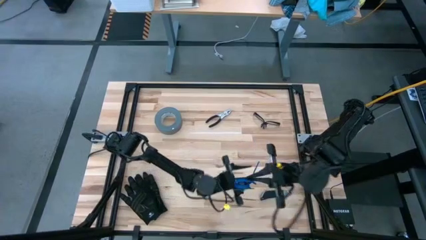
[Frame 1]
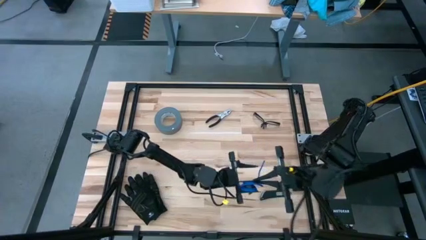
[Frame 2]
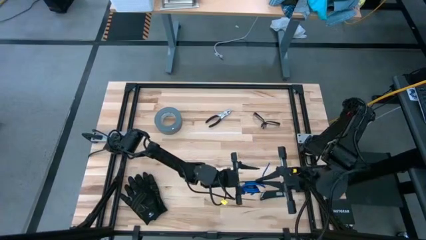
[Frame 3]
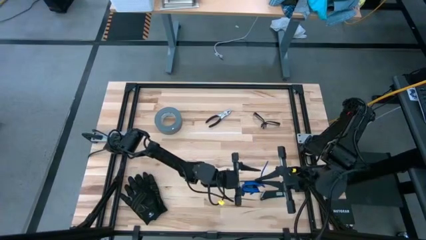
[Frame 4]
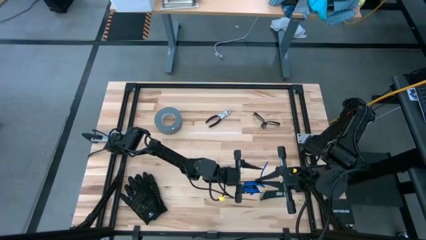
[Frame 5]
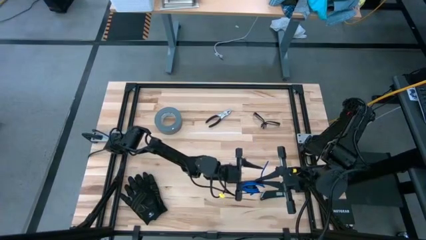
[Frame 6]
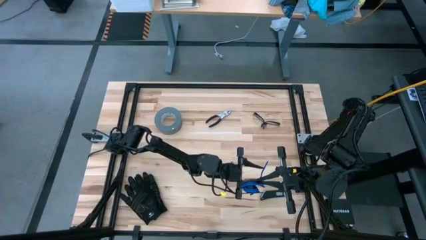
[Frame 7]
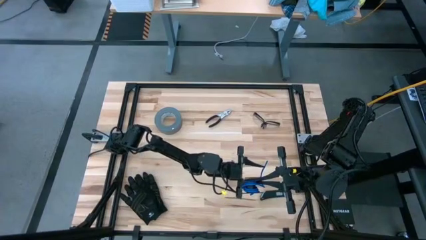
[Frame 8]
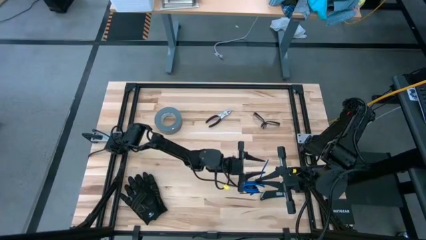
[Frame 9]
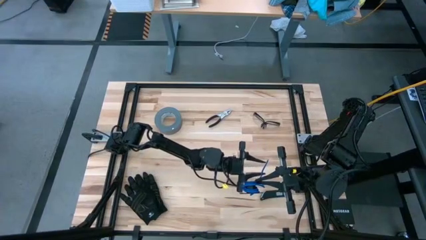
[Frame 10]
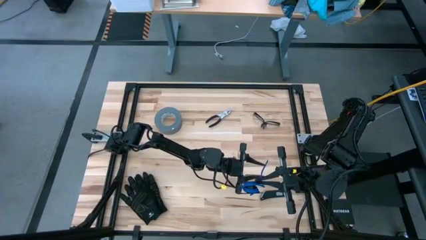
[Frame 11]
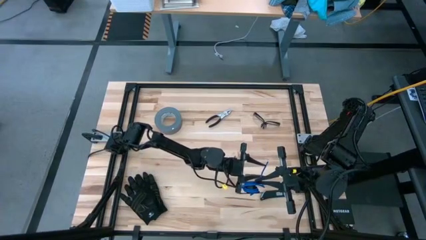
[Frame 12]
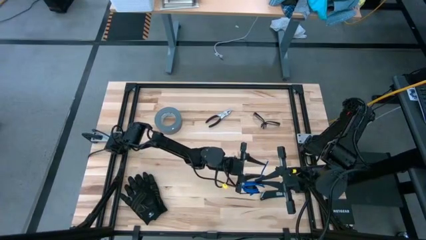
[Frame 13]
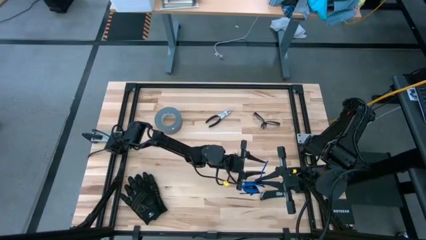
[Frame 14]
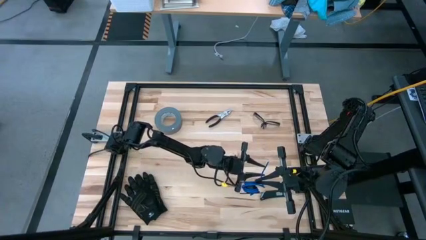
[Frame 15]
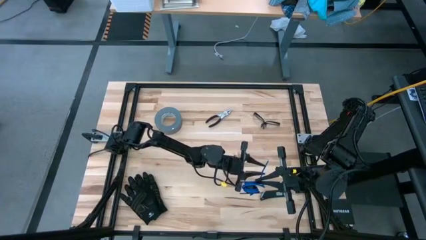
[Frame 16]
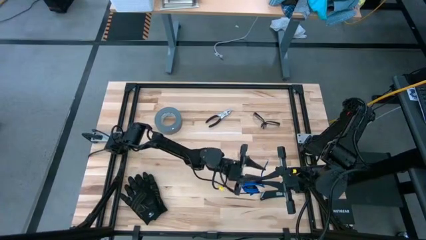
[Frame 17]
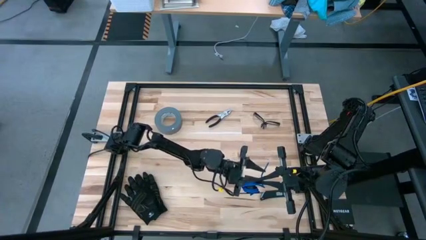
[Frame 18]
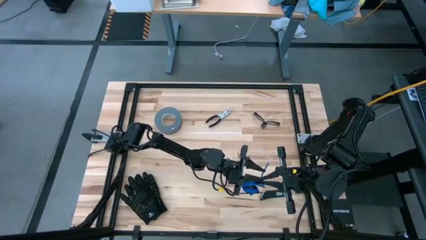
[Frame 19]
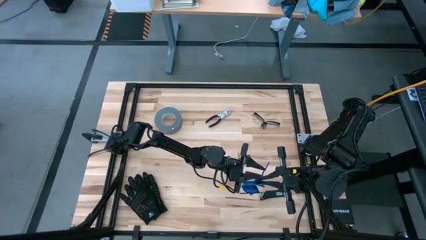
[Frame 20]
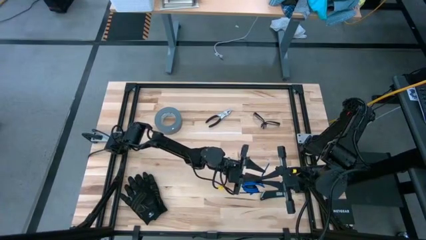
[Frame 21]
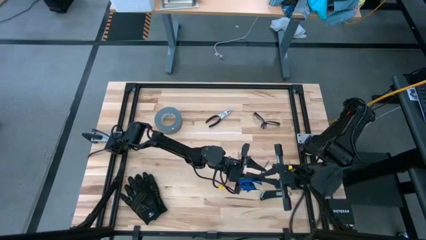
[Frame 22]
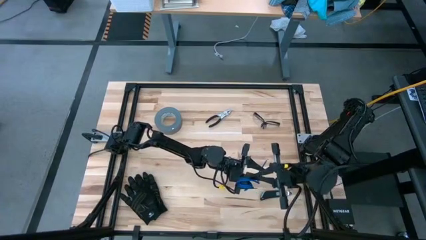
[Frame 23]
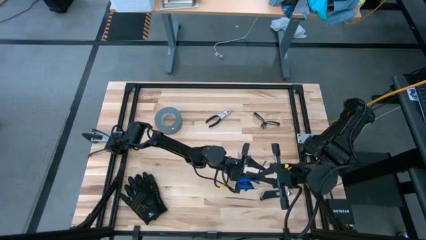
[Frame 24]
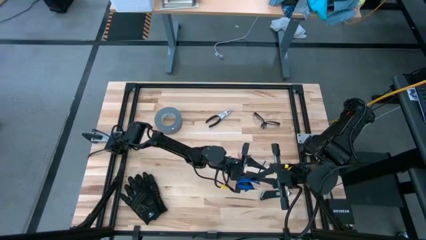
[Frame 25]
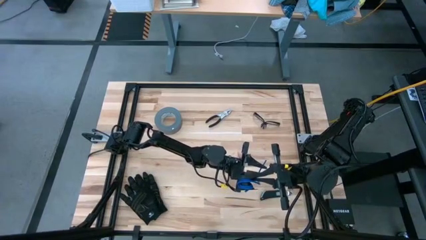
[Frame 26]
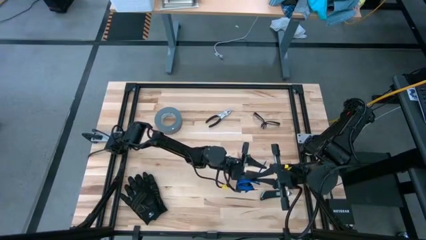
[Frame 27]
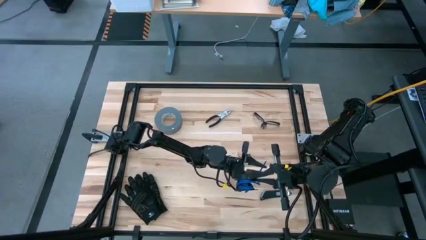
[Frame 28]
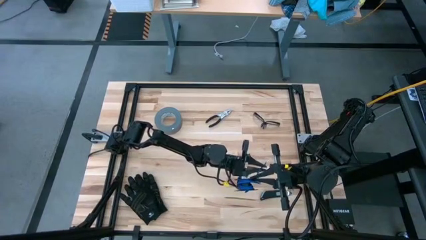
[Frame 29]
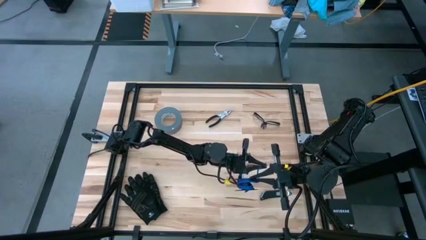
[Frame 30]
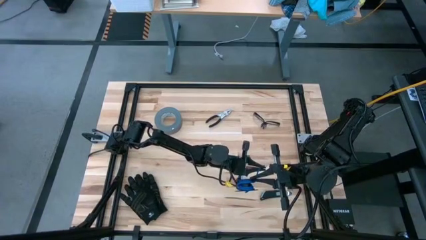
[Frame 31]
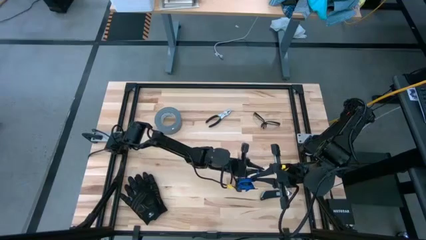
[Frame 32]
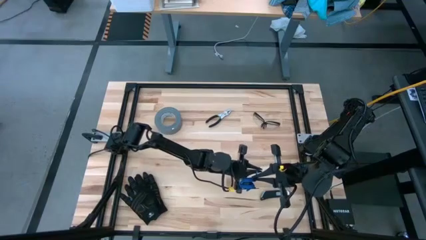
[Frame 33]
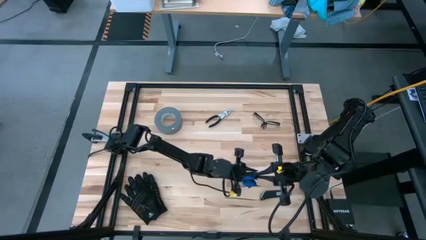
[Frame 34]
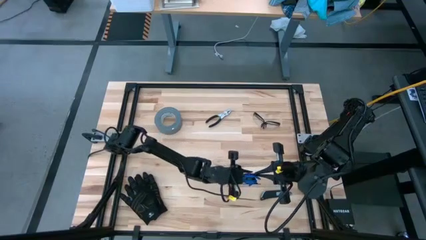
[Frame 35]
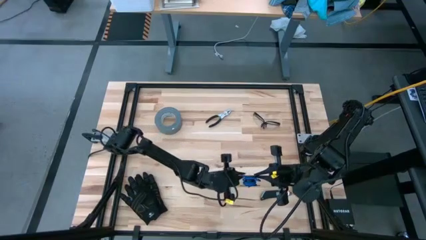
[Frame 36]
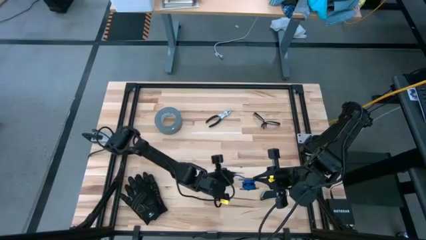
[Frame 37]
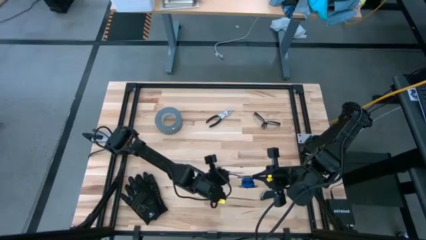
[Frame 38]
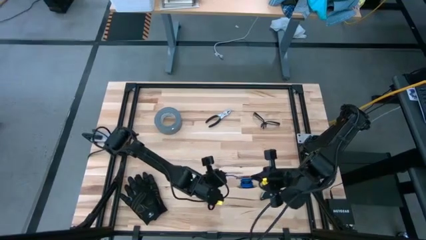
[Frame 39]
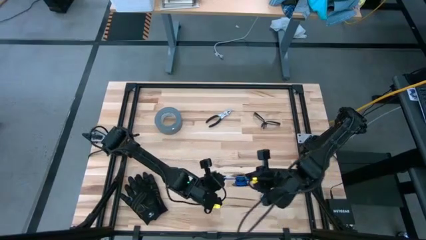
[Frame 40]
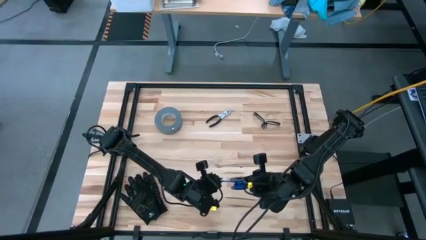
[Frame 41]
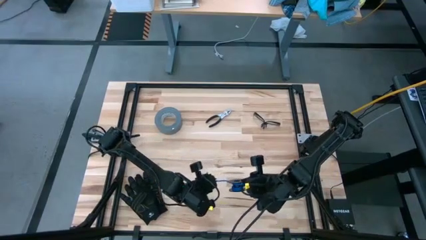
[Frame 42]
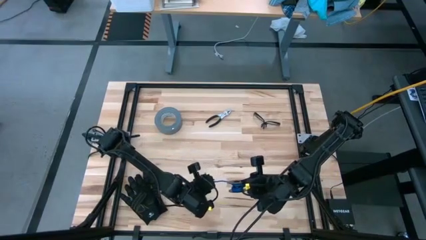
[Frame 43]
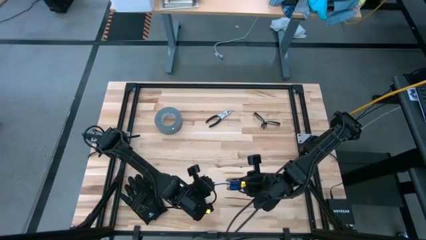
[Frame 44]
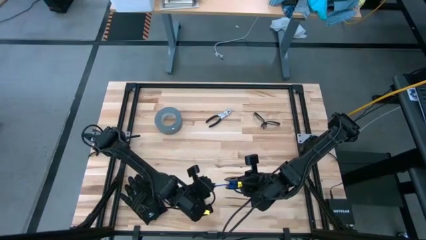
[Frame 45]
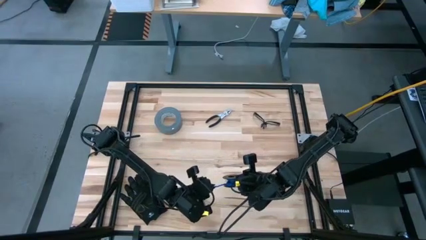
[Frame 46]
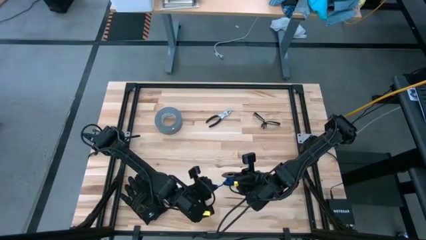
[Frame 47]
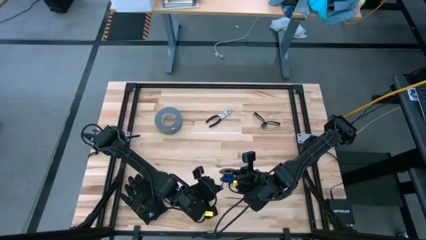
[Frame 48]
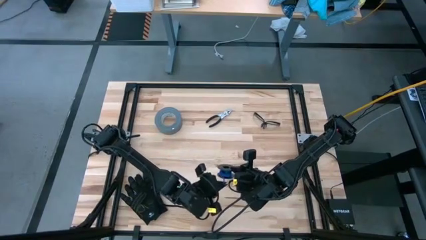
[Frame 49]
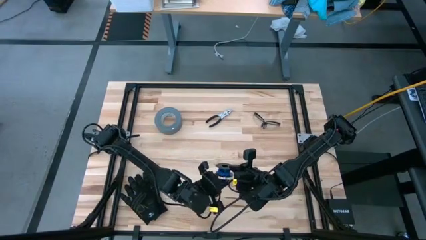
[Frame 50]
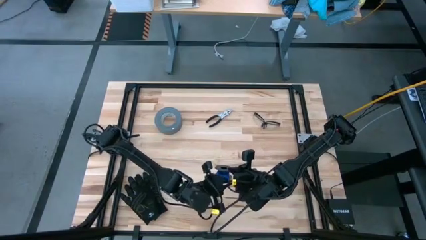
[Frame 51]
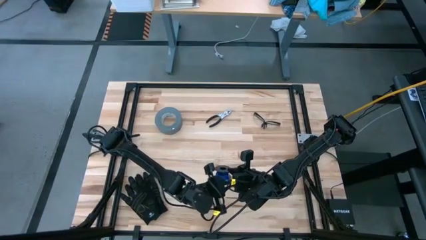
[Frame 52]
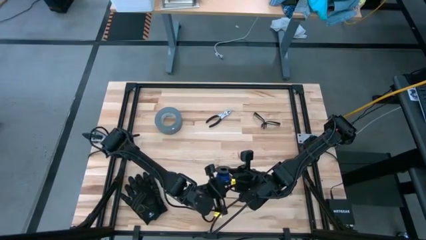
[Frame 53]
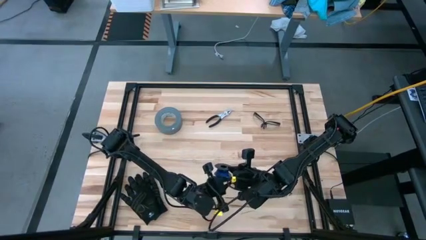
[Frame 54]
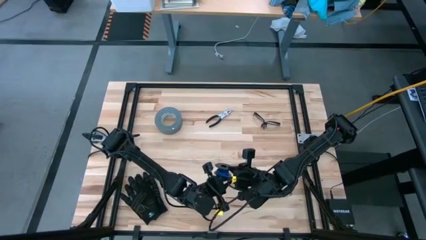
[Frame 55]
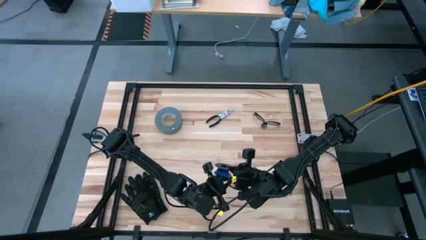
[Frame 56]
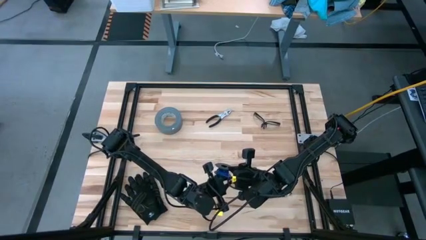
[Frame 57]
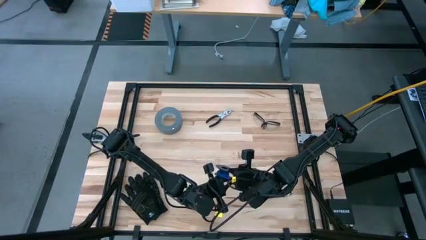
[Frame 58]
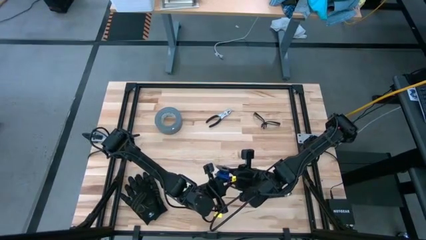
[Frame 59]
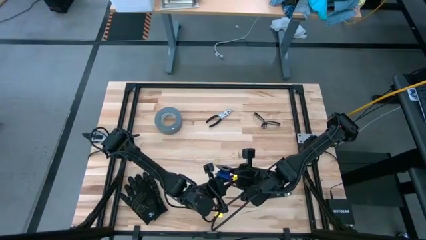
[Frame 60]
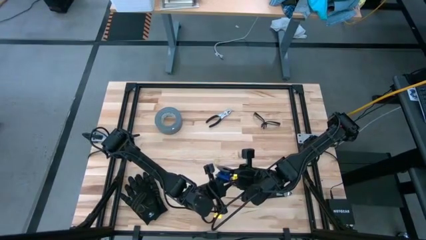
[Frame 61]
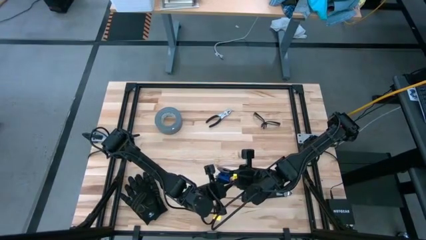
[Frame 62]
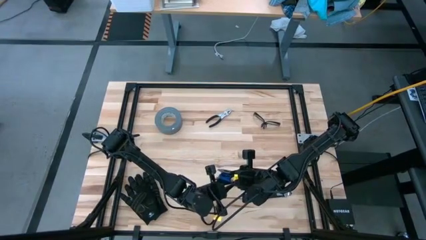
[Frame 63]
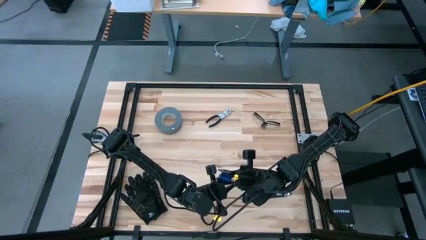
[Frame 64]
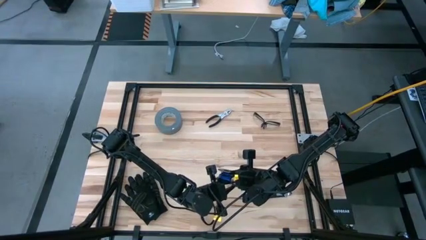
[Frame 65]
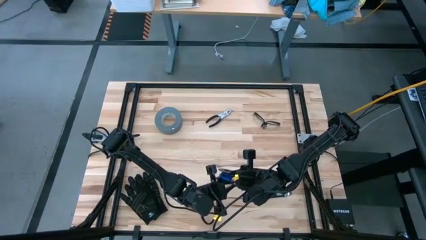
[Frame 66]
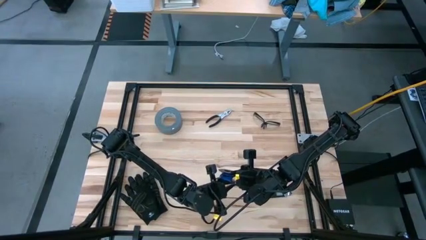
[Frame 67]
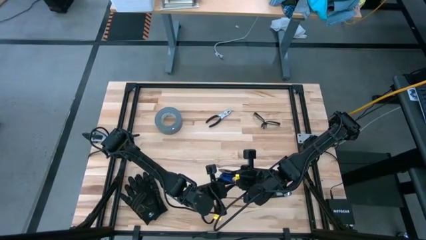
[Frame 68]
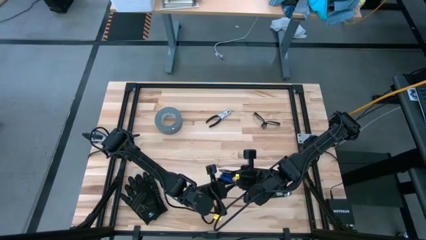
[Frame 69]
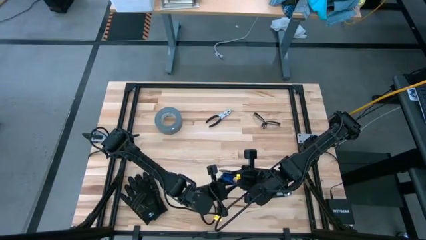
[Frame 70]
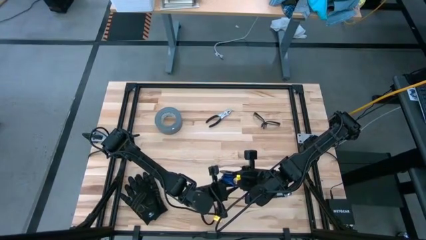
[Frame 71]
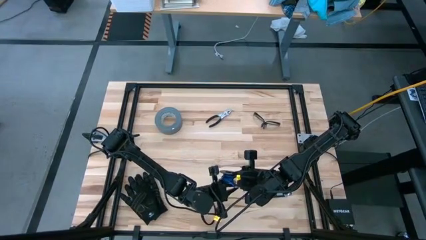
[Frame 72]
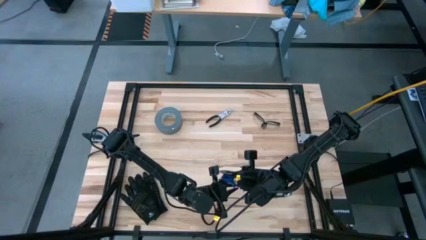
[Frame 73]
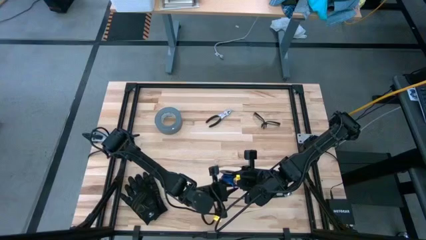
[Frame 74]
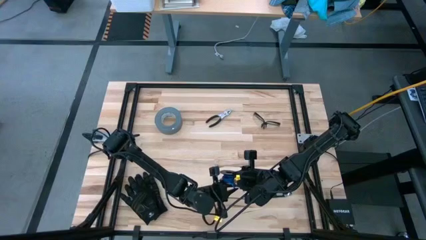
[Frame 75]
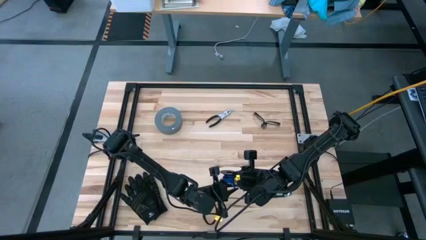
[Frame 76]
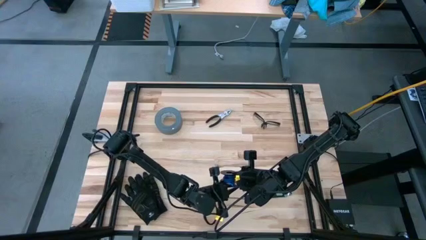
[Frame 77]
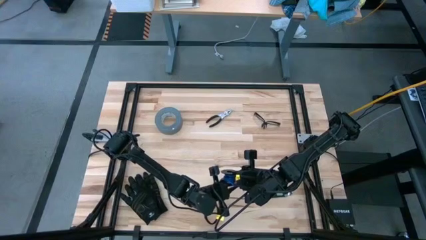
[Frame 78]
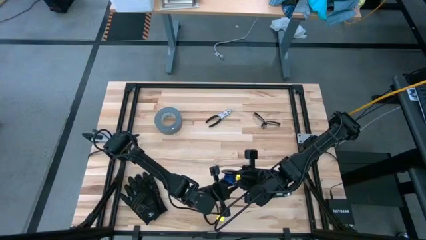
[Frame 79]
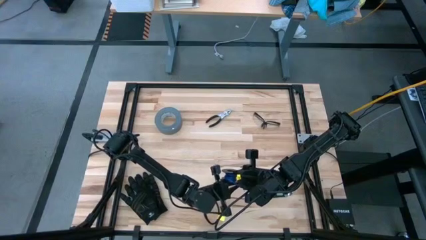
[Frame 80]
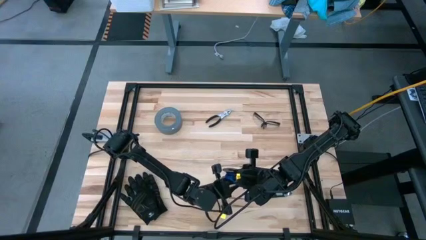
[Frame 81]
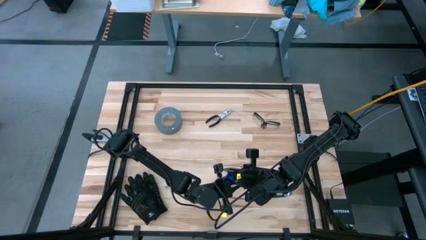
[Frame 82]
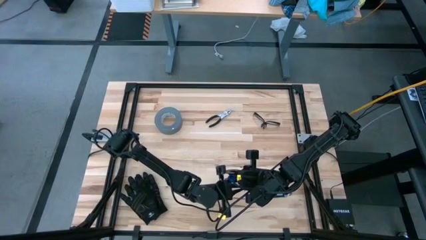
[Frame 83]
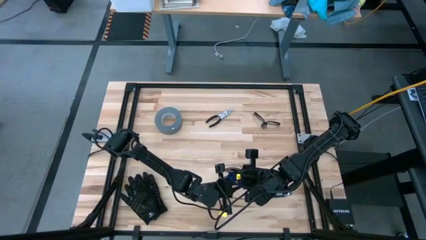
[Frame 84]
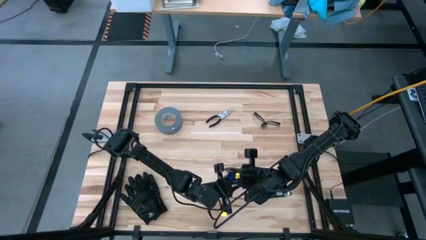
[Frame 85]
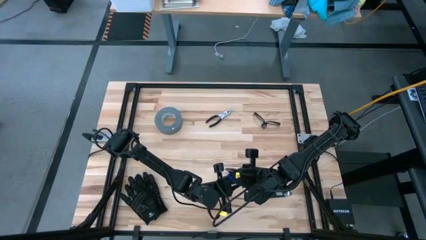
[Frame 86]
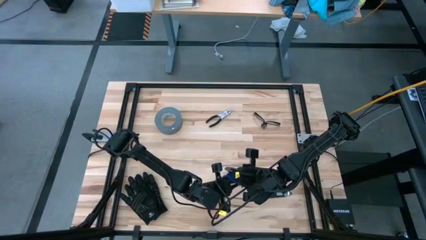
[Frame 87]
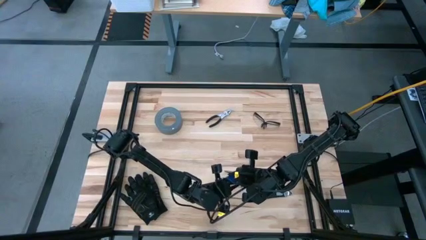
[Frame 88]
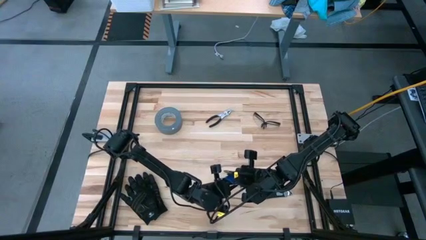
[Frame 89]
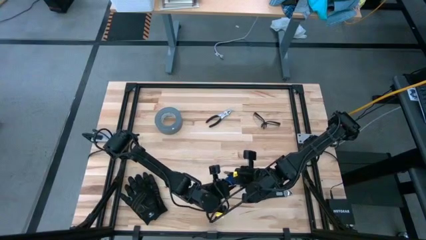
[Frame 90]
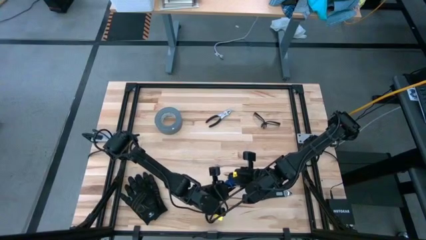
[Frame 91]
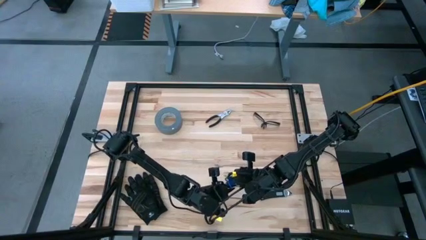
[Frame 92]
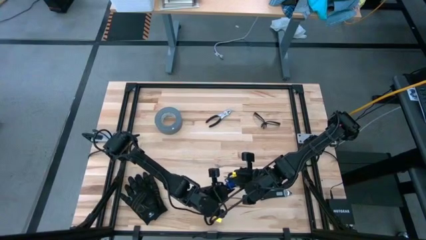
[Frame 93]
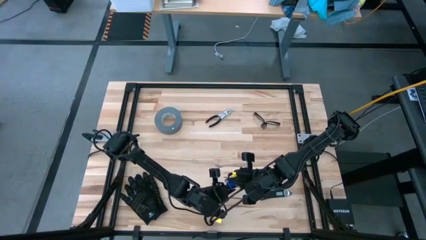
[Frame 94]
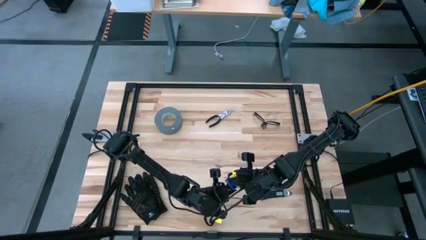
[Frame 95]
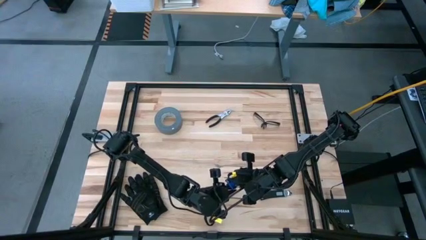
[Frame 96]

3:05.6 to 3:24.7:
Task: Coil cords
Coil the blue wire cable onto the black spool
